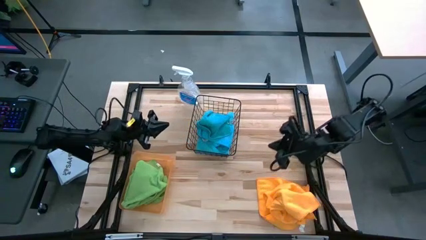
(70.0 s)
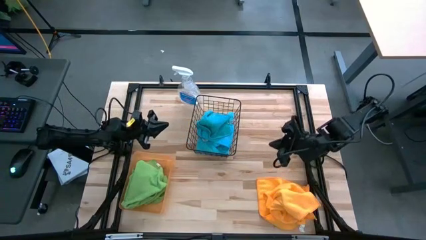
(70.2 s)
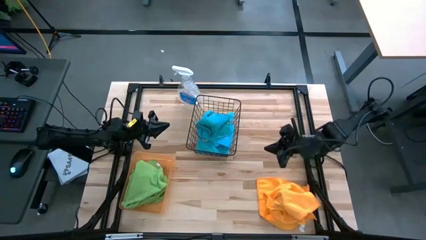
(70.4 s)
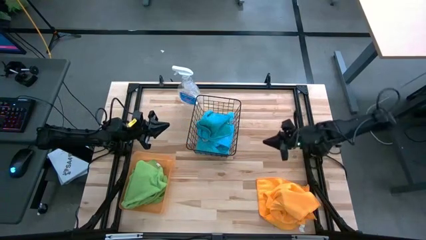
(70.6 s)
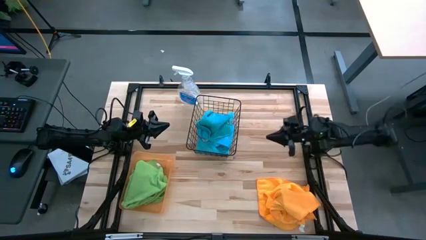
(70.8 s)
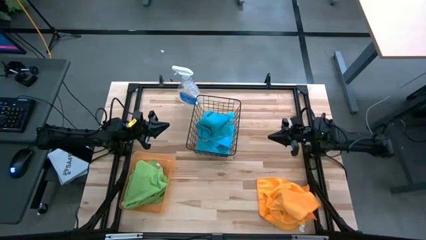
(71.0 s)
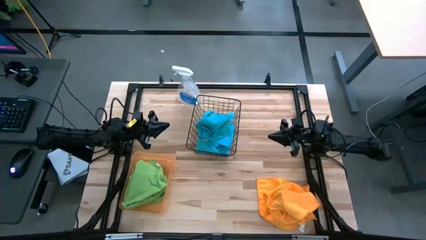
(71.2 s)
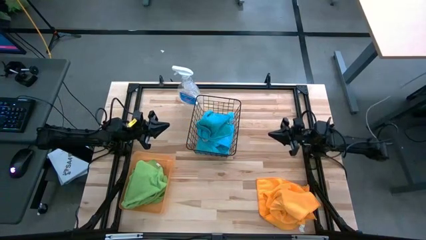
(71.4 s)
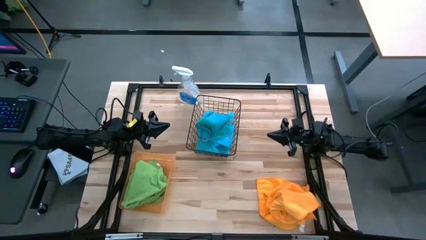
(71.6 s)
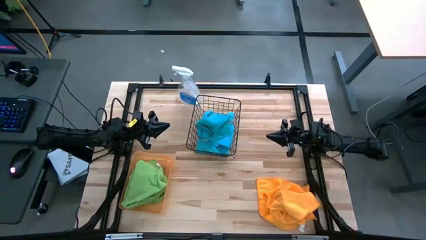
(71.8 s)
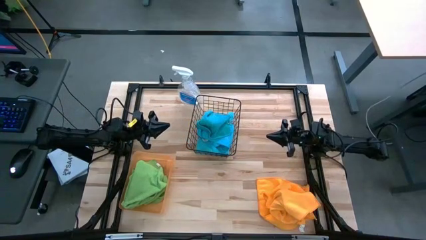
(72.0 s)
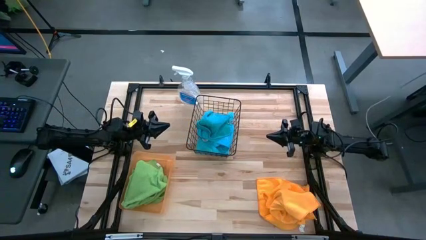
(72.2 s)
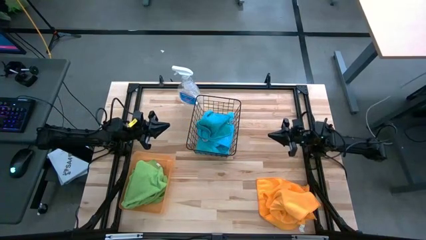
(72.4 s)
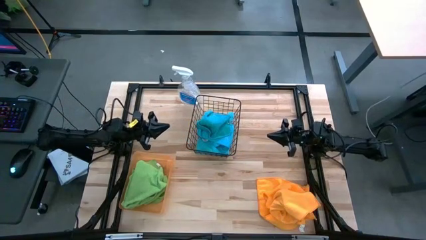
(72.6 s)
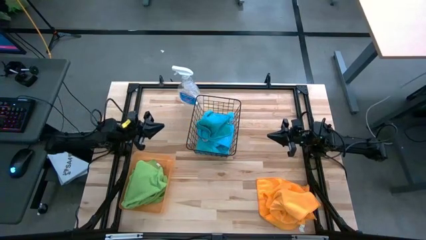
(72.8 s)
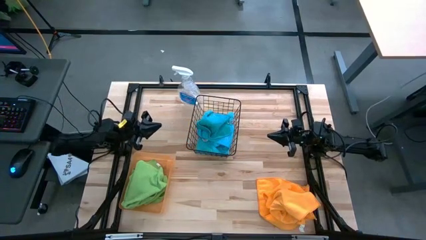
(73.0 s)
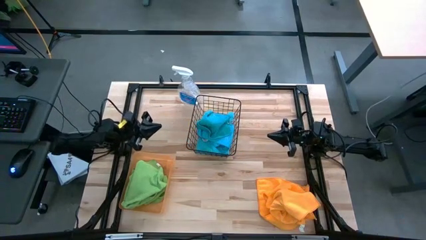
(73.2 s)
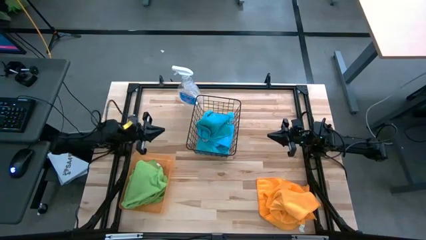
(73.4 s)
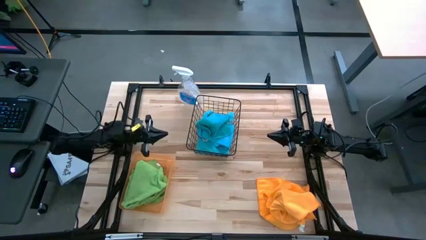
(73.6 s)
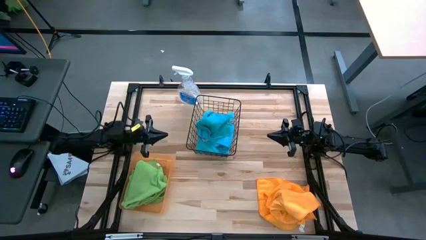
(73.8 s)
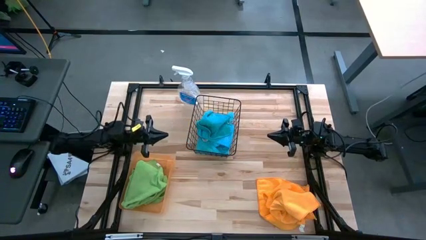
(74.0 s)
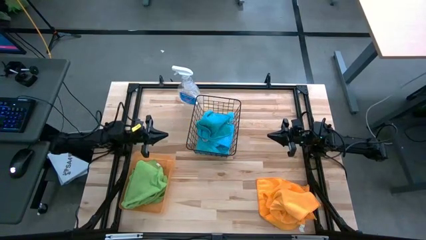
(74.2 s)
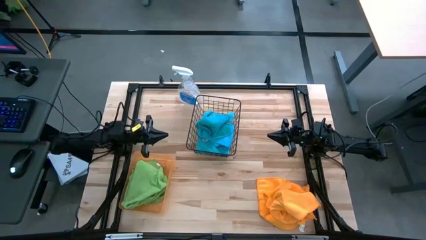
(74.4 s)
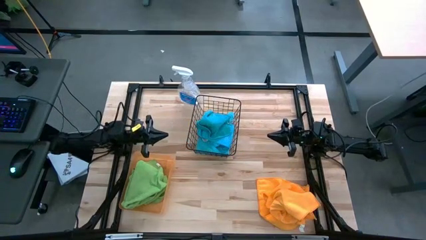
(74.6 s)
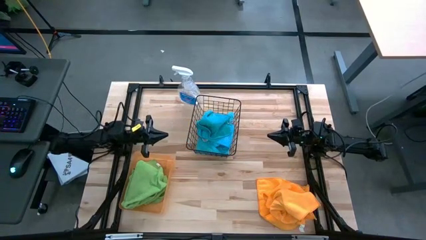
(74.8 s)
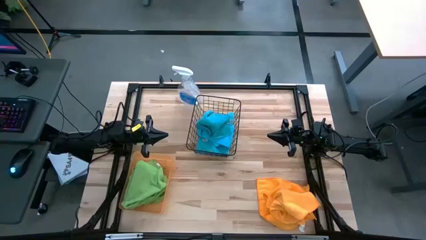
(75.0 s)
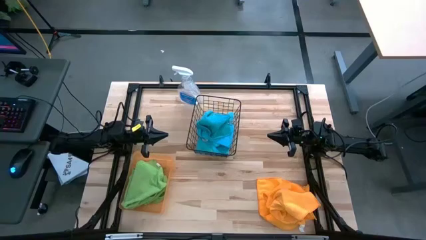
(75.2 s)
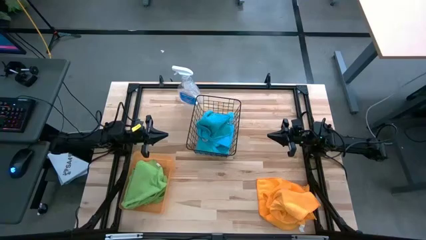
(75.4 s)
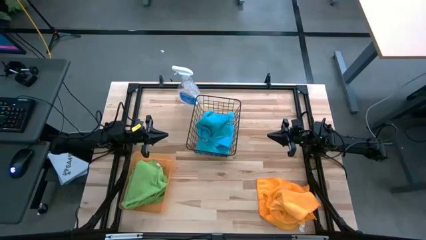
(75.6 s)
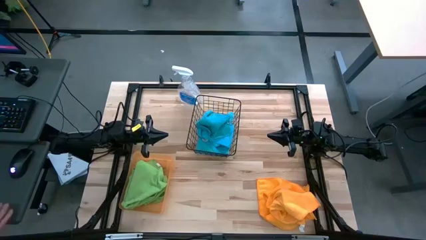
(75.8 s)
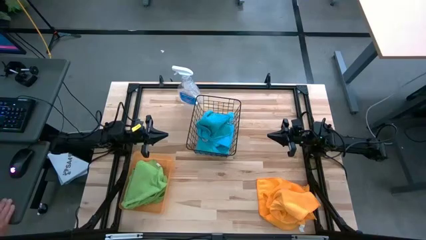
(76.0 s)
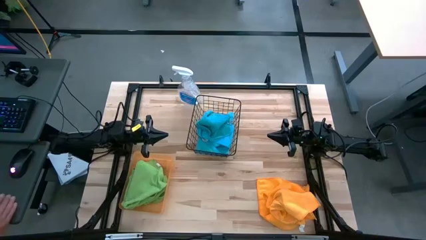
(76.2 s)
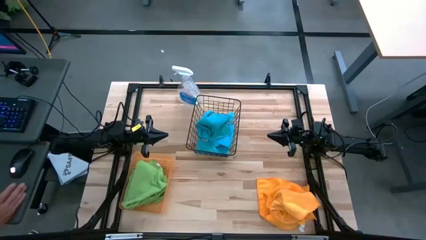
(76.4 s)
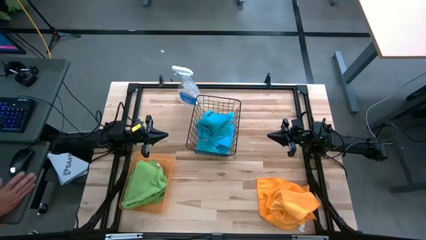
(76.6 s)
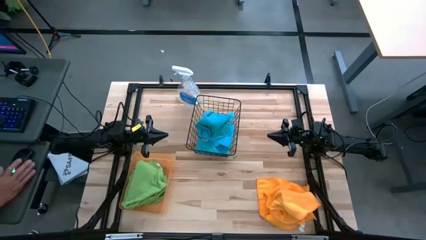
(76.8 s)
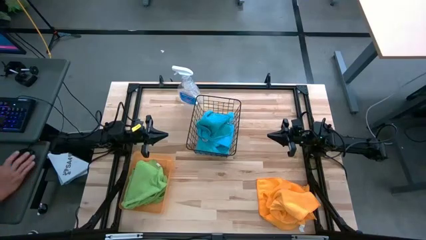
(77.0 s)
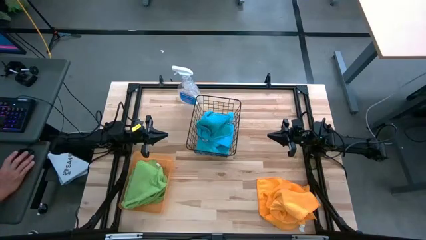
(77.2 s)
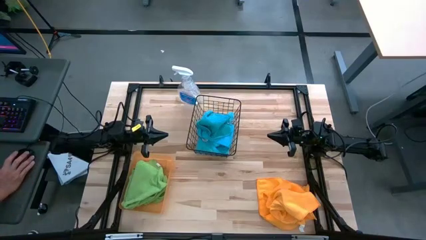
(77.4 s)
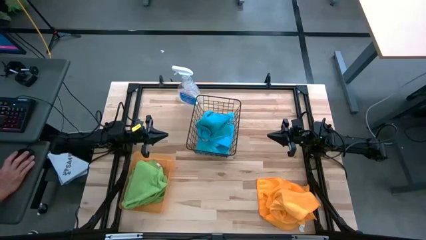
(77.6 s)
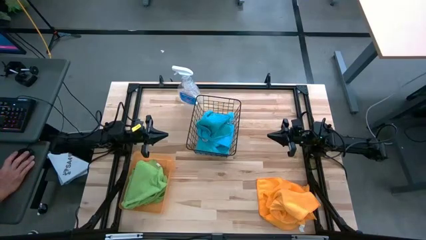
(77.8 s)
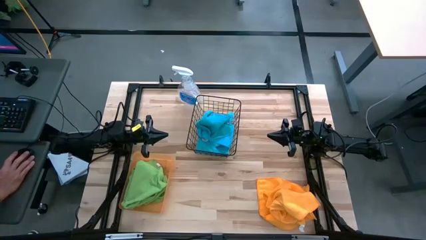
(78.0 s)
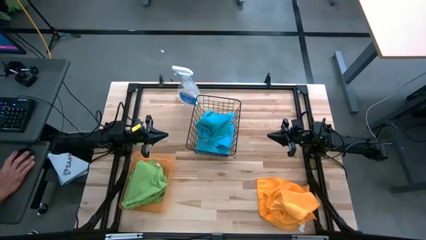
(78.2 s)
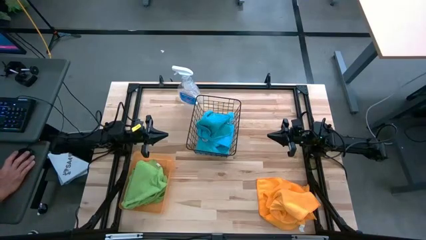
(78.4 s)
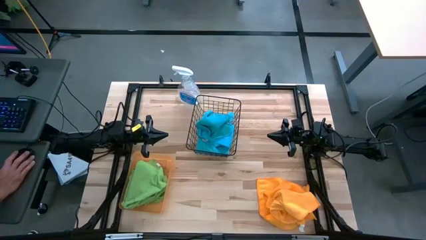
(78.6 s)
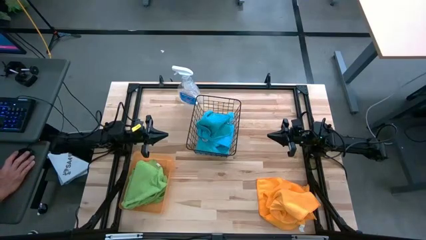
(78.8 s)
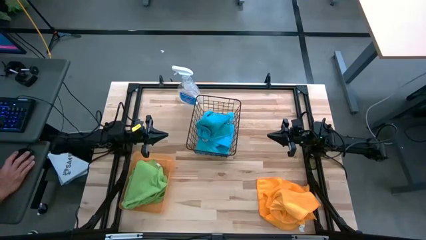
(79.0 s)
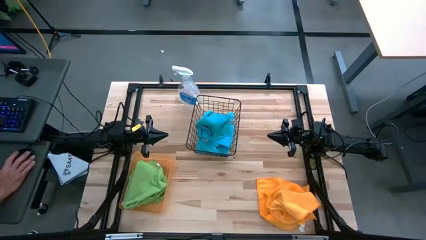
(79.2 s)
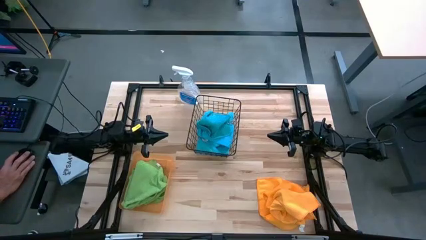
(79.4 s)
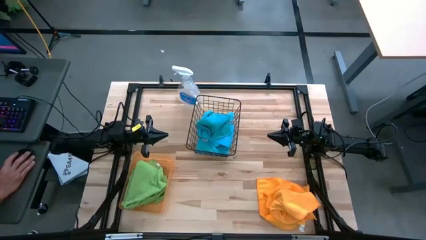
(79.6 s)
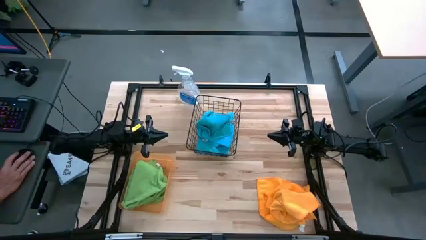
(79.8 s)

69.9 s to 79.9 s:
Task: Sort microfiber towel by color & place in baskets
Return to Home Position

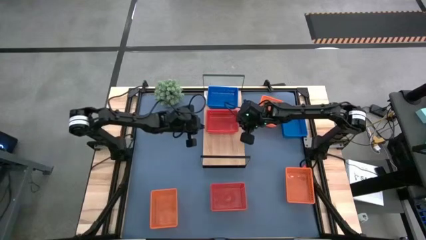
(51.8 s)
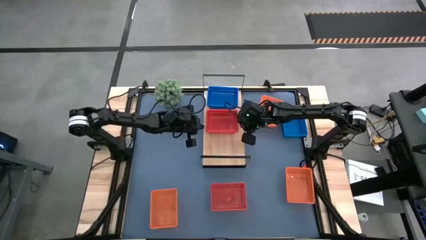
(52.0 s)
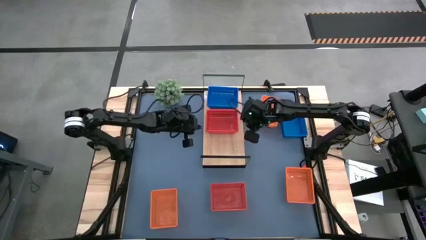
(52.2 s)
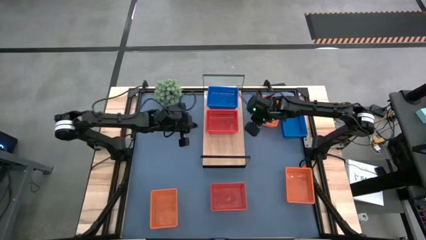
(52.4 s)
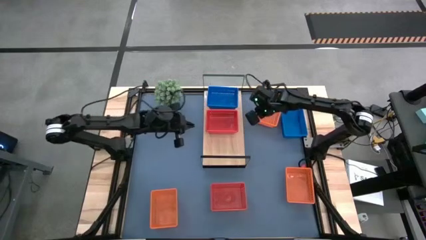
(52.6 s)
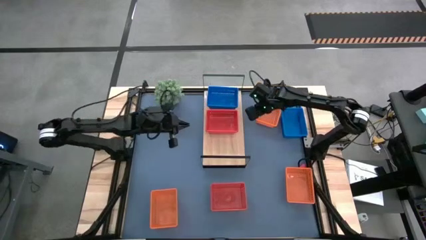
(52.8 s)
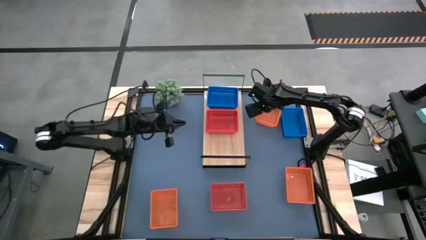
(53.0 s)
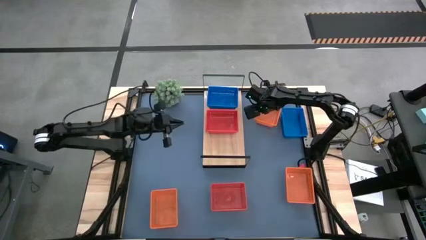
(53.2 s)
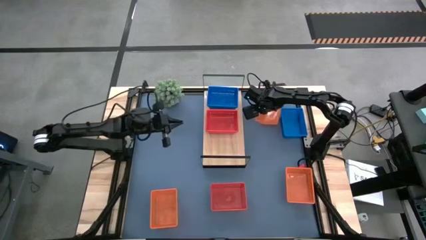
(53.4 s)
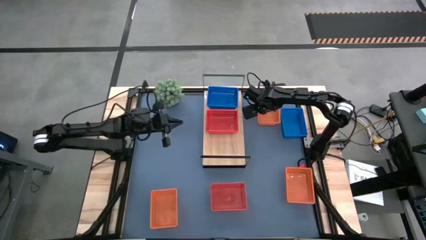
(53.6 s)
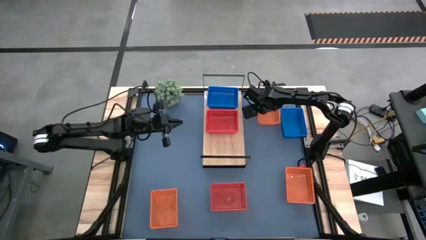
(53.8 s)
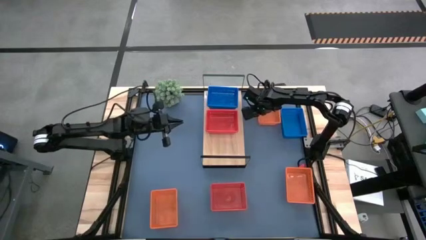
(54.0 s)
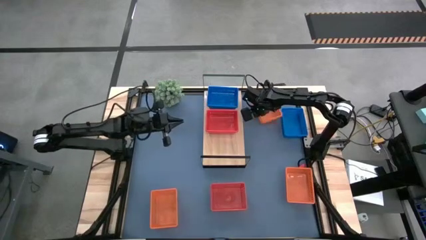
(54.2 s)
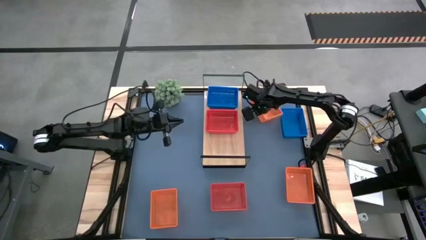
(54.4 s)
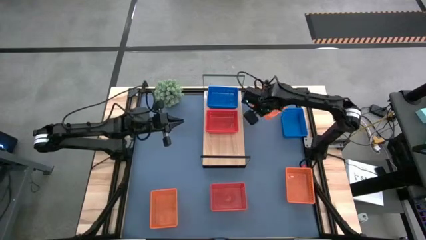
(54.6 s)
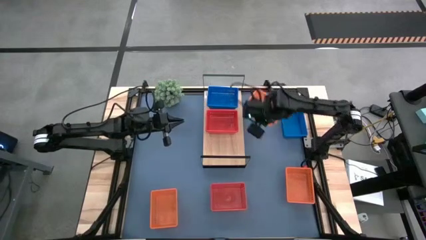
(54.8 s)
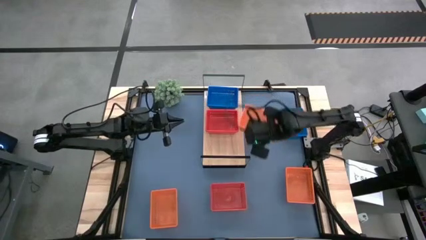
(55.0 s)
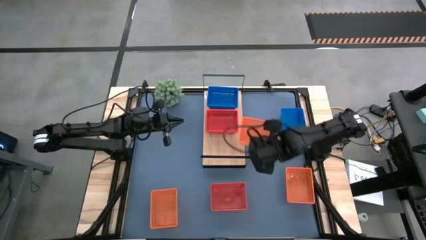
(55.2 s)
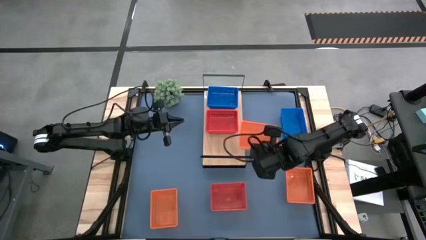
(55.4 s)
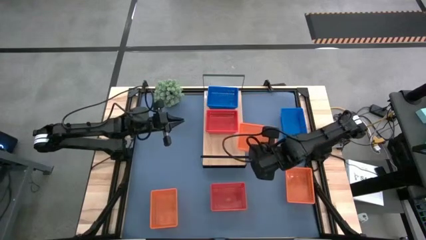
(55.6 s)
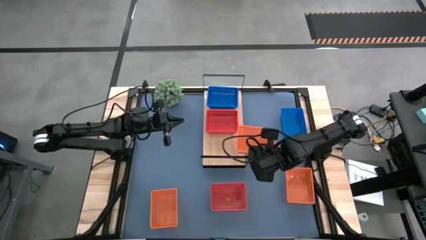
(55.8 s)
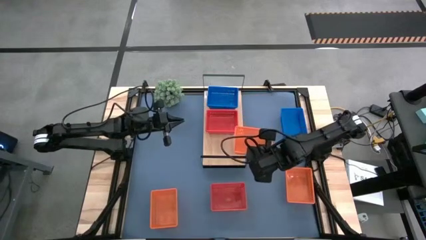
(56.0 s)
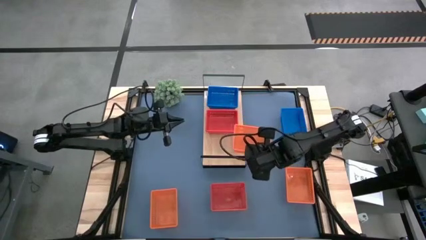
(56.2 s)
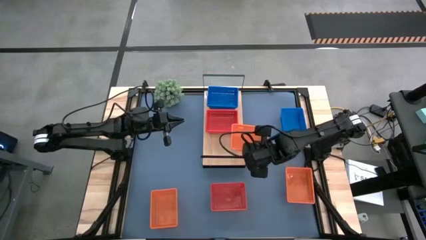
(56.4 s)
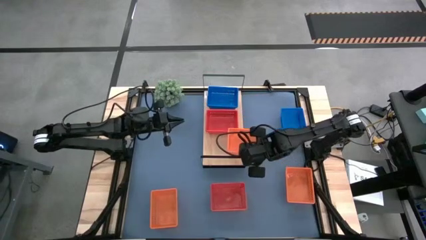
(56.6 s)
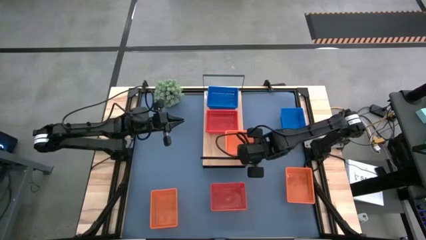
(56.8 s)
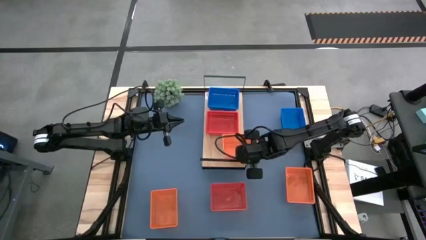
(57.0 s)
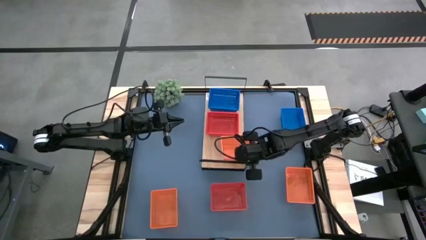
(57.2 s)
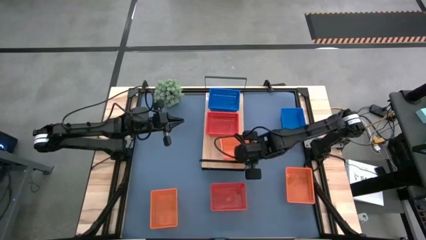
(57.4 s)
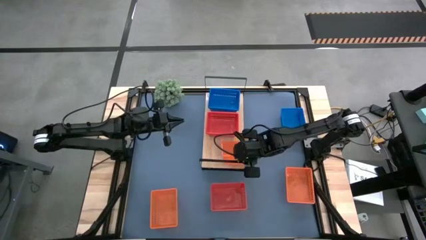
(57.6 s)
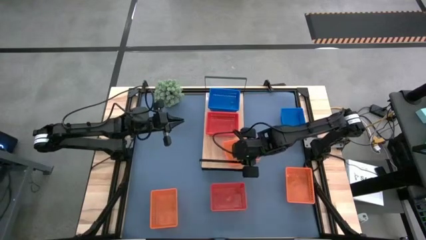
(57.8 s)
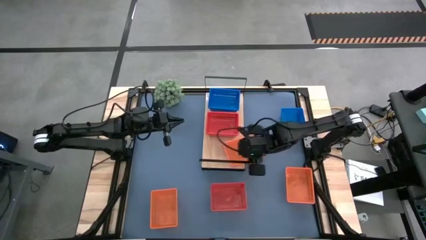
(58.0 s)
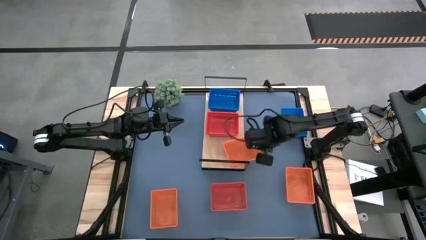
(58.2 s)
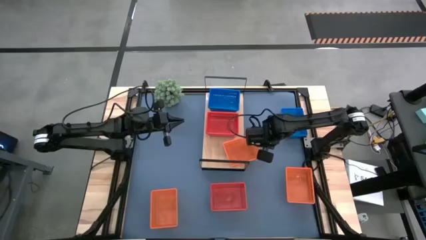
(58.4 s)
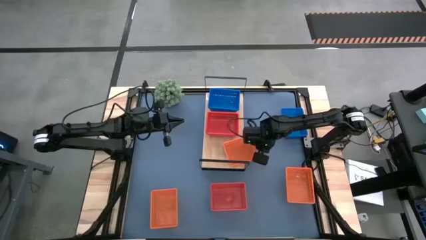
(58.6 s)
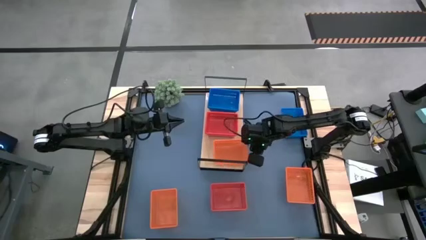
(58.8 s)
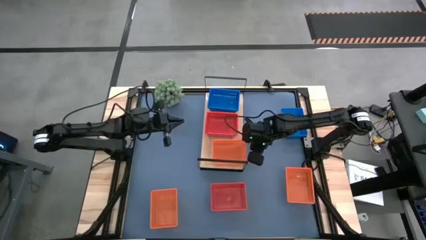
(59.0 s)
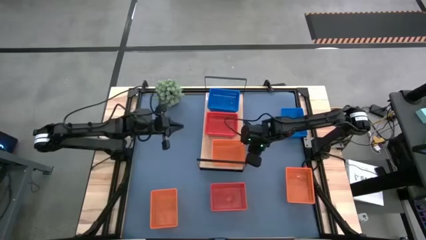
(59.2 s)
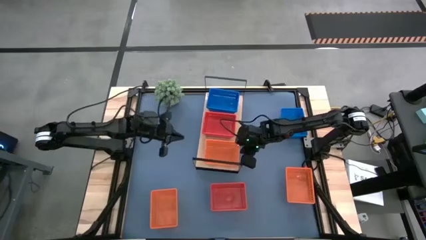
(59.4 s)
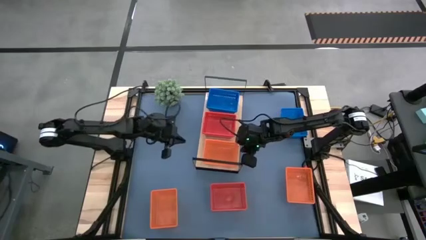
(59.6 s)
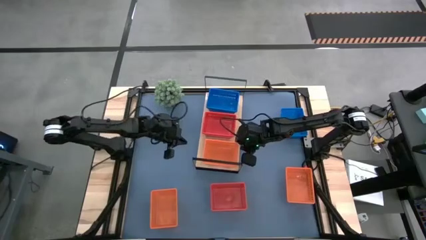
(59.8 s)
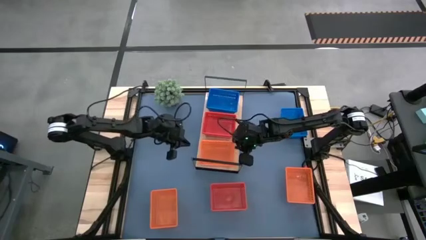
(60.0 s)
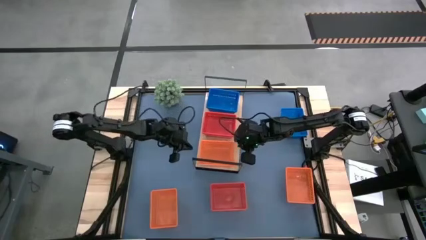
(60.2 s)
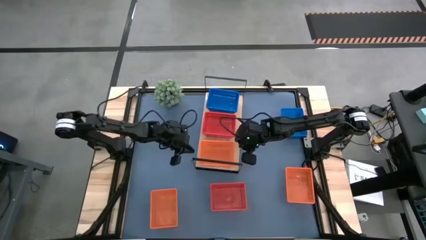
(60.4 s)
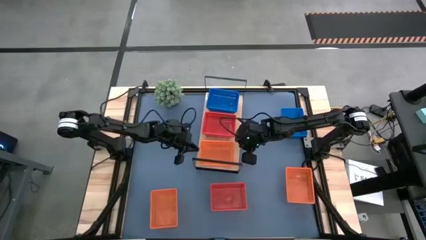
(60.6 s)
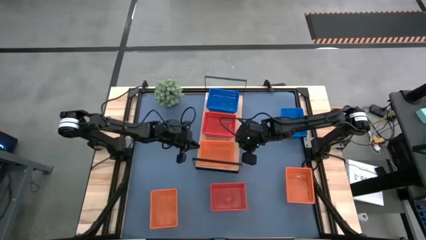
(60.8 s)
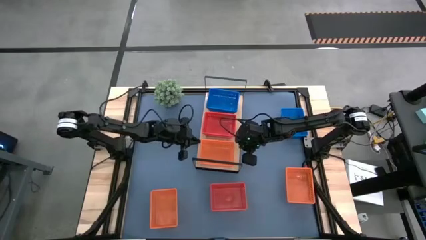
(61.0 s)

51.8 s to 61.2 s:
Task: Stack baskets on shelf by color
Put the top right orange bin on the shelf
